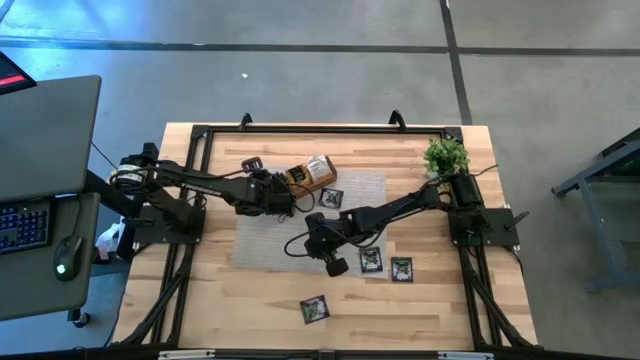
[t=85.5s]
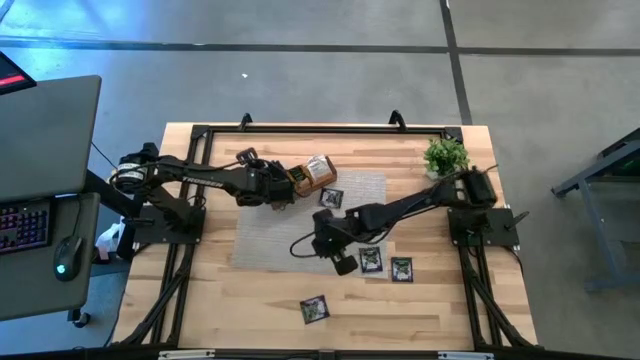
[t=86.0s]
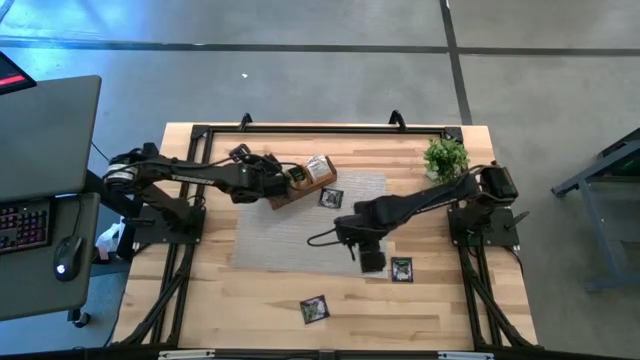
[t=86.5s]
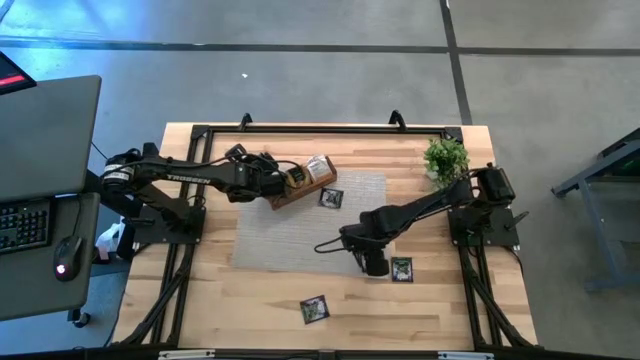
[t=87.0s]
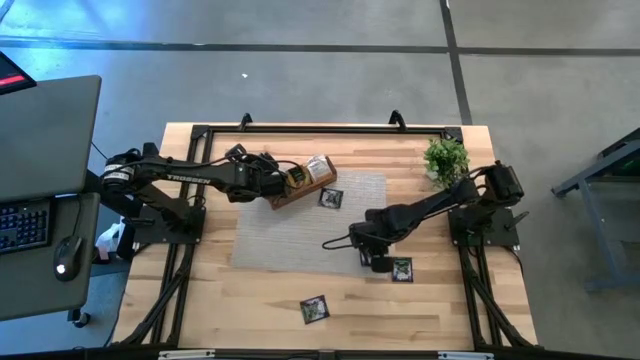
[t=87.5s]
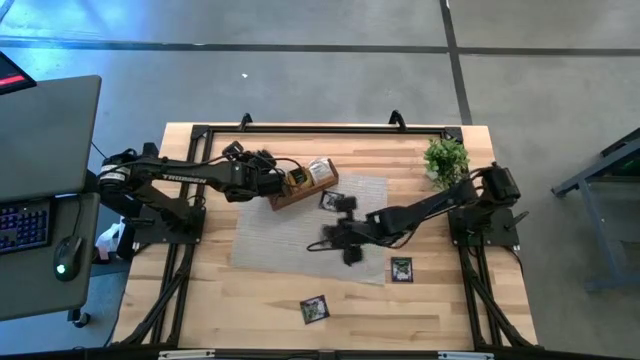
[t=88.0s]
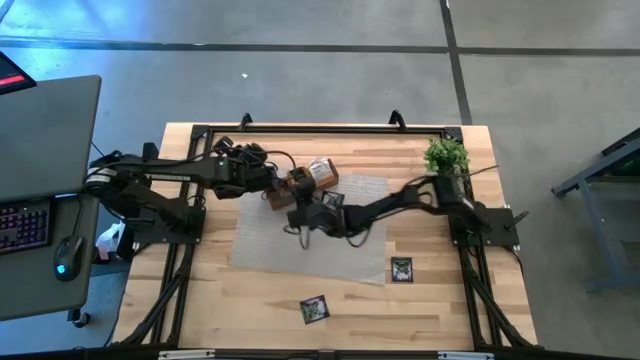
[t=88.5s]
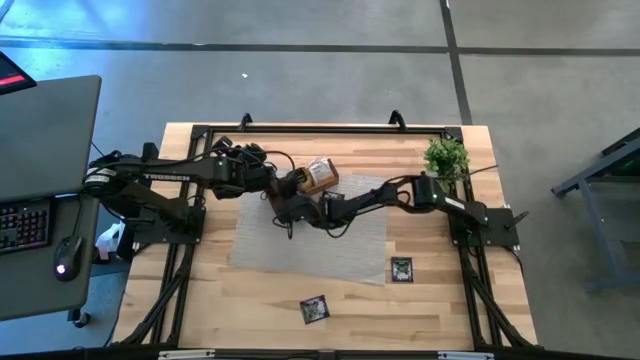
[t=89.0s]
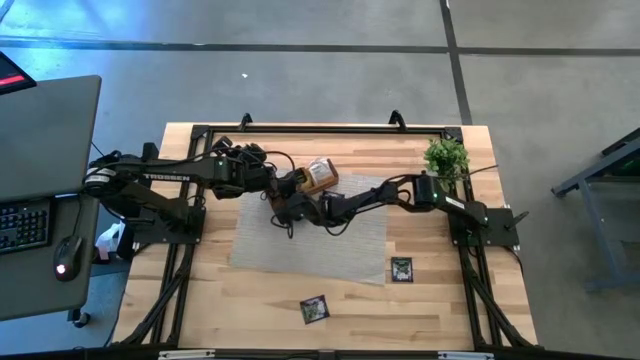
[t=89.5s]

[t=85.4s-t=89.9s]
Task: Pick & Place Tea
Put the purple tea bag into the left section of the wooden organizer

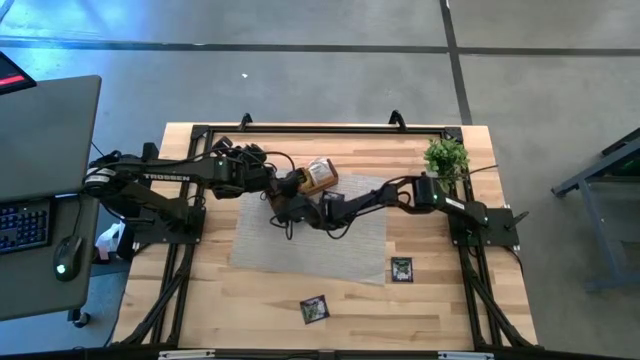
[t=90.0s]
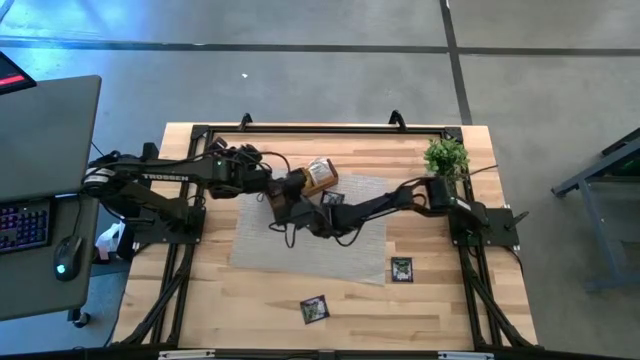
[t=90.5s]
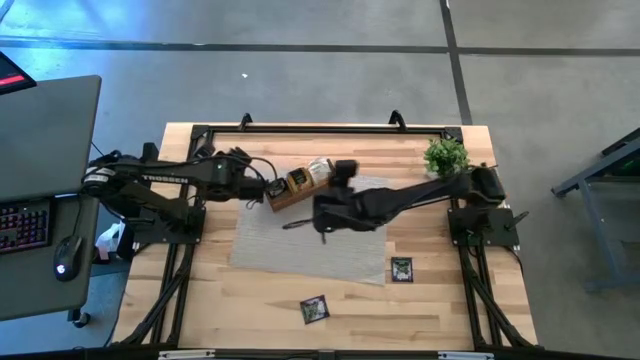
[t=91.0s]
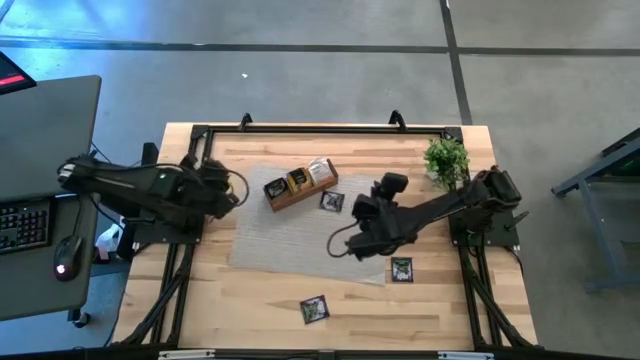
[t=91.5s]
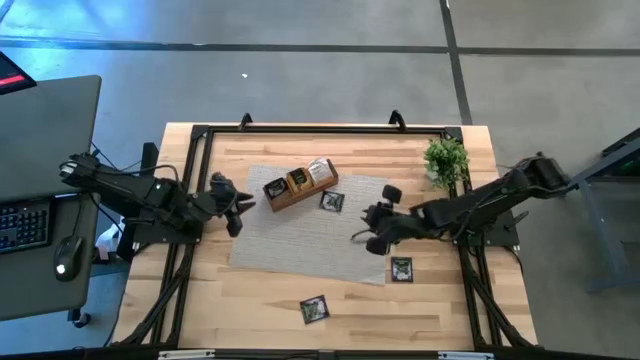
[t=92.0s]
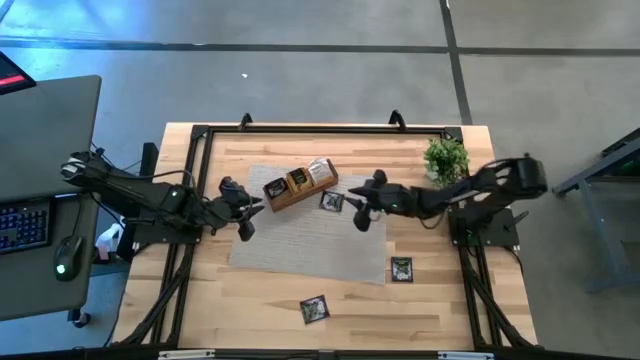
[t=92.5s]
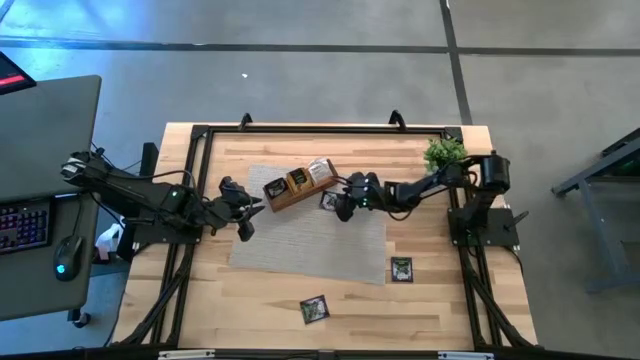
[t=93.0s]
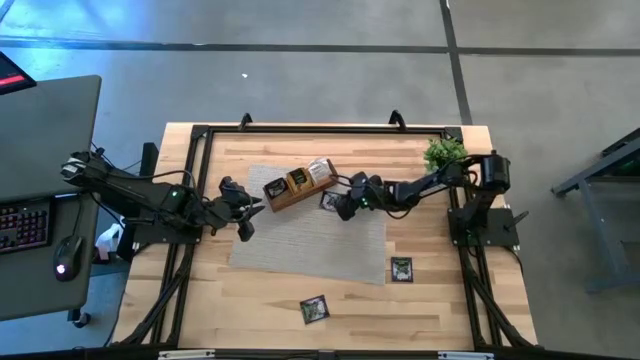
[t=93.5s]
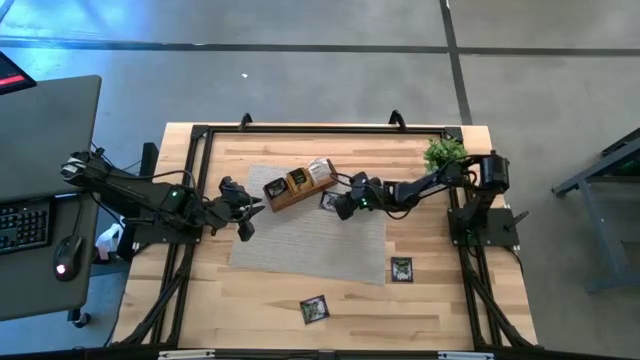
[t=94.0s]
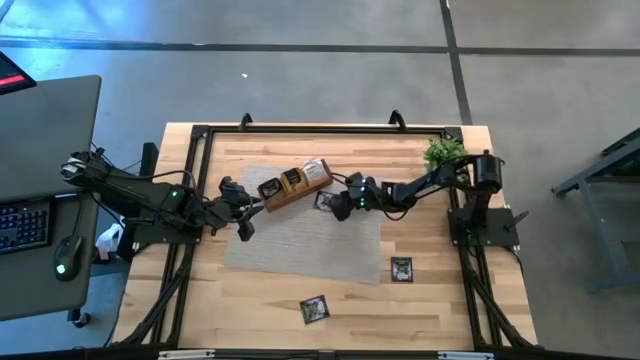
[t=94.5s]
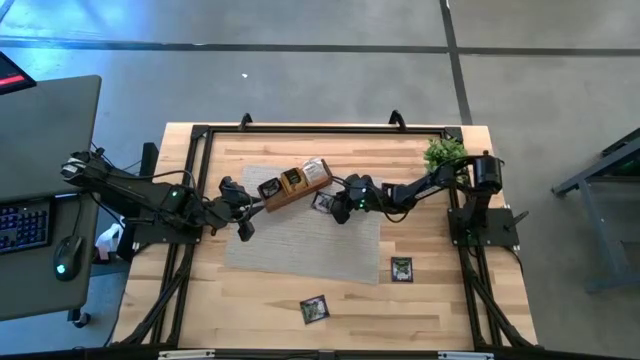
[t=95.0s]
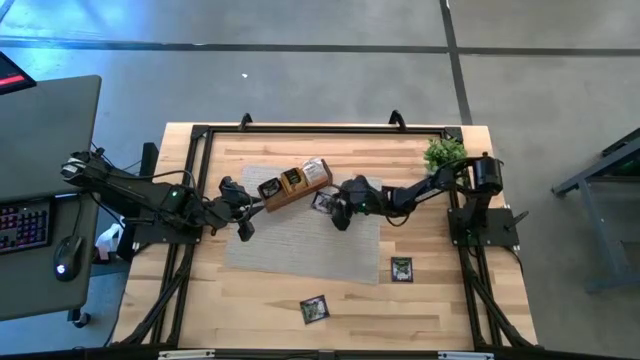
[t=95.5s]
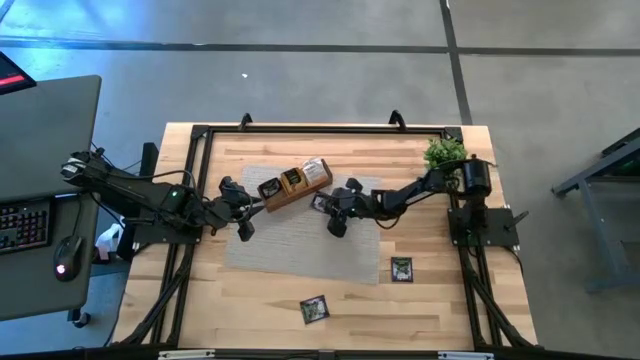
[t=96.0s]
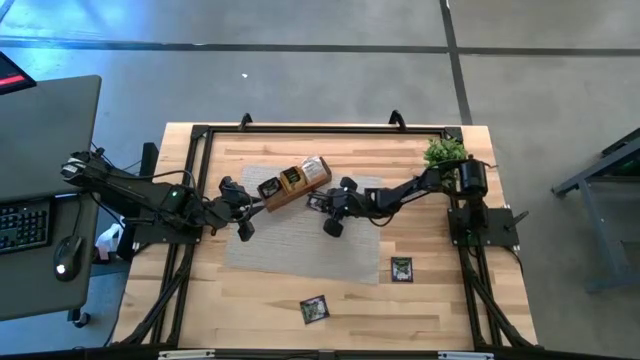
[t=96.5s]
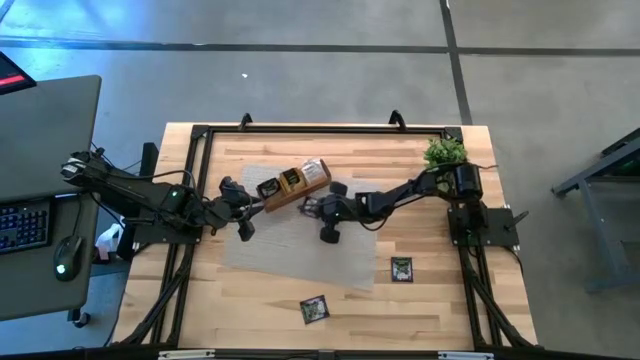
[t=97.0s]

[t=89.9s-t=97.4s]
Put the purple tea bag into the left section of the wooden organizer

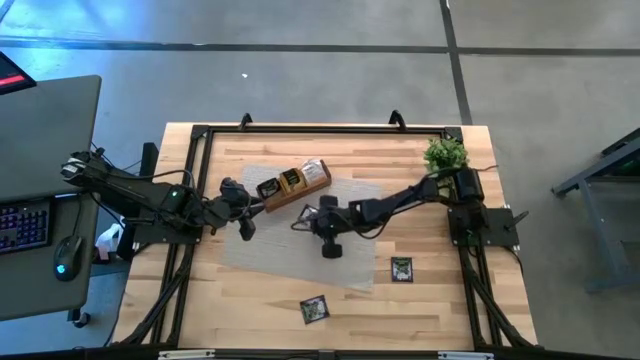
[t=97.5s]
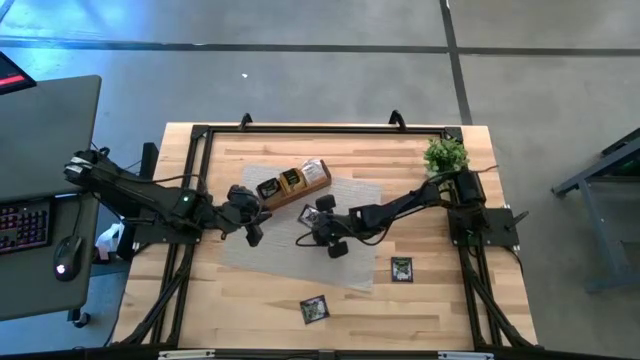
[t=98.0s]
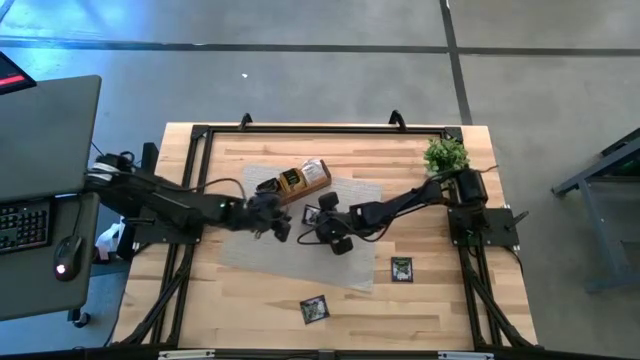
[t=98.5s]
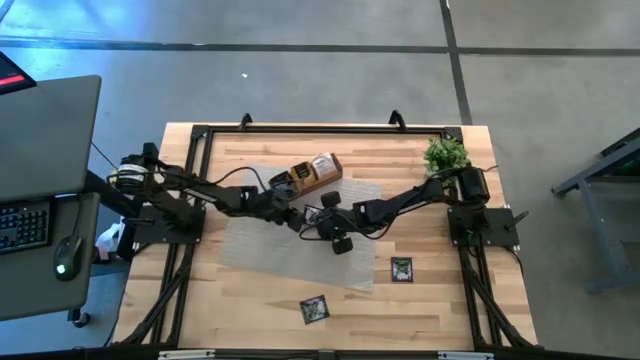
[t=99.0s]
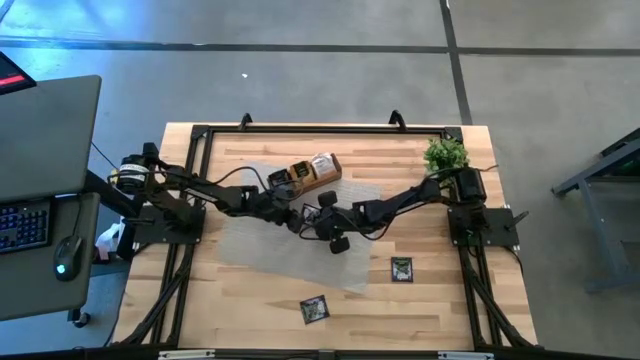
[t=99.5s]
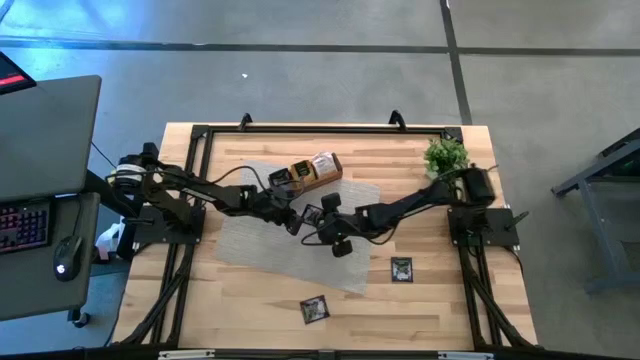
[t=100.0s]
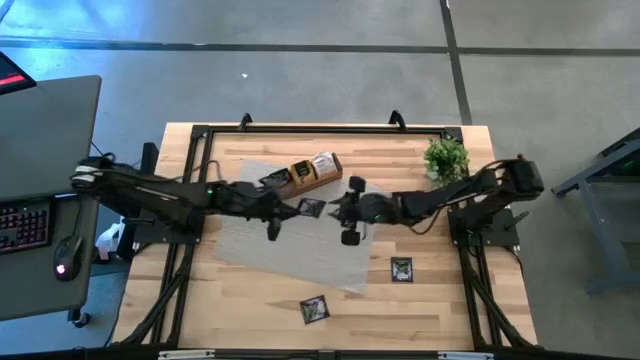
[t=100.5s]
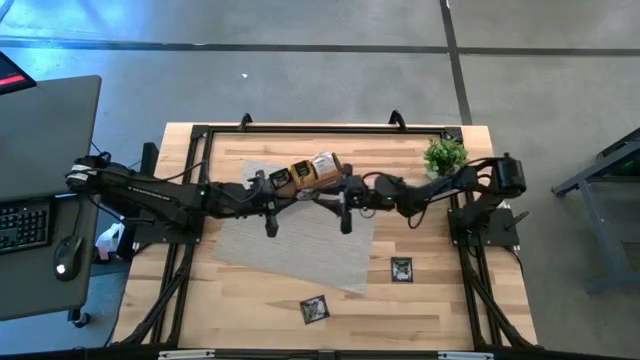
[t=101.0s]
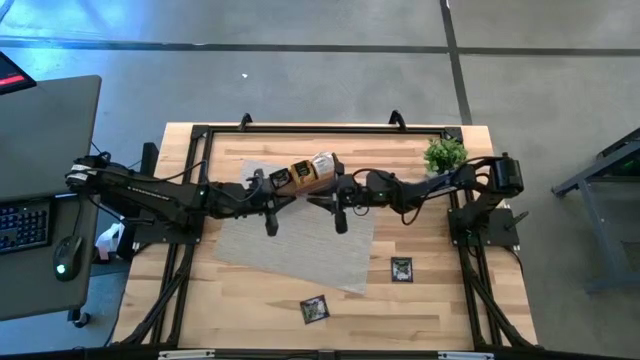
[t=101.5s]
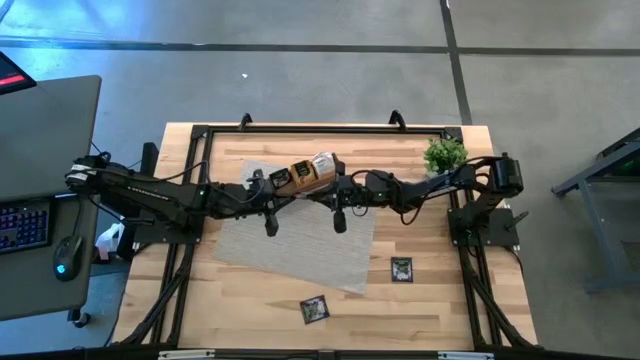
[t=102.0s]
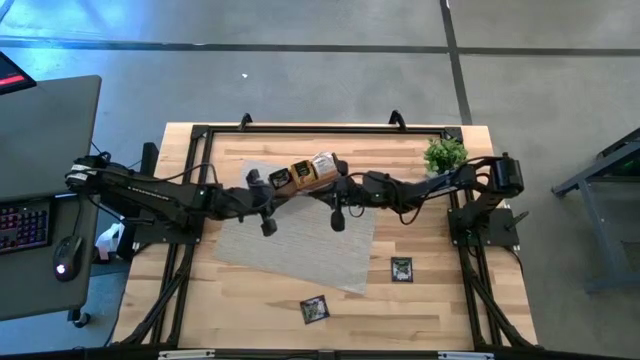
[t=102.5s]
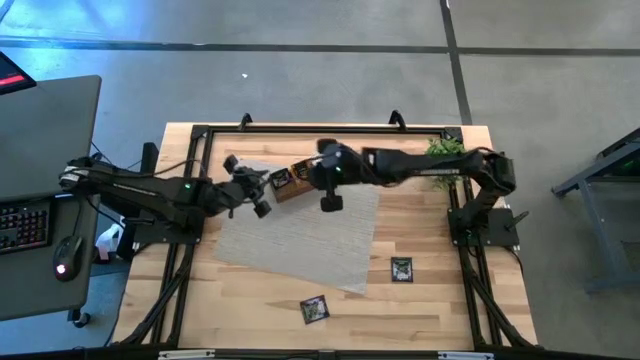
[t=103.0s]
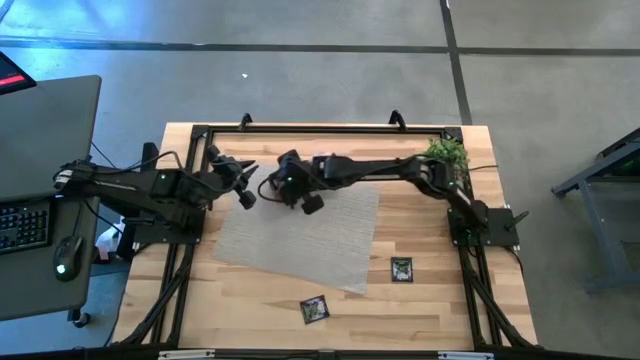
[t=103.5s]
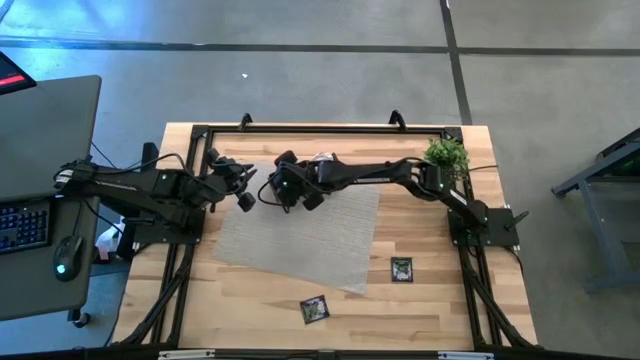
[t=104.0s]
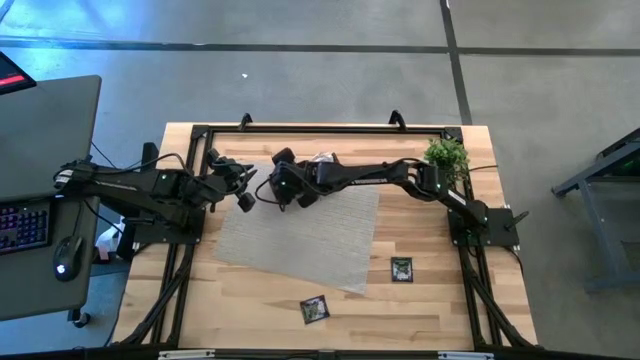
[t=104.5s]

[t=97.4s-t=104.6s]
Put the purple tea bag into the left section of the wooden organizer

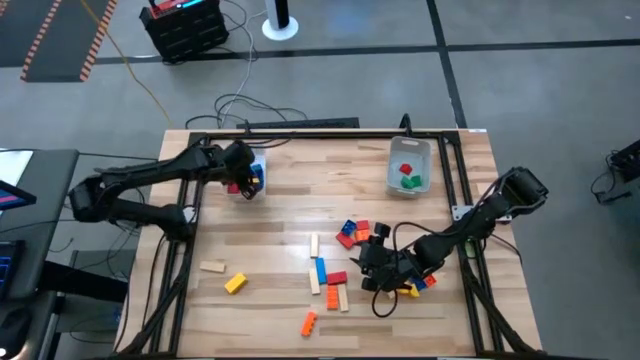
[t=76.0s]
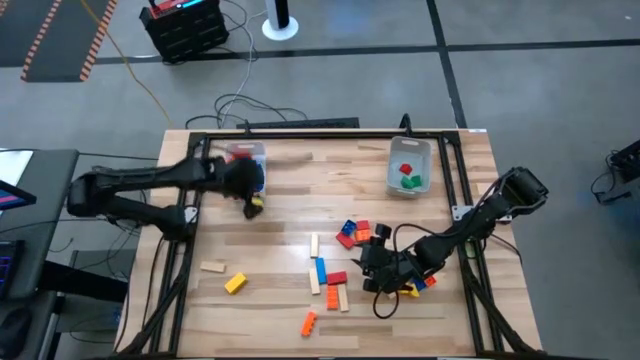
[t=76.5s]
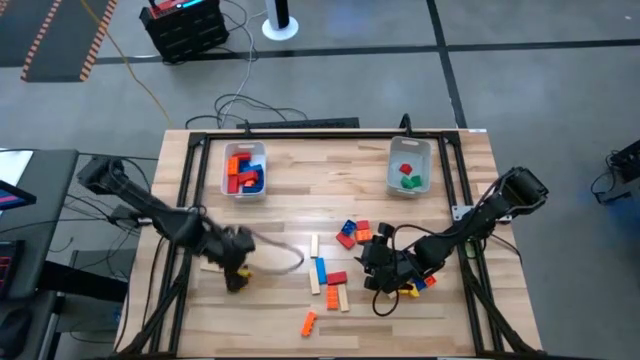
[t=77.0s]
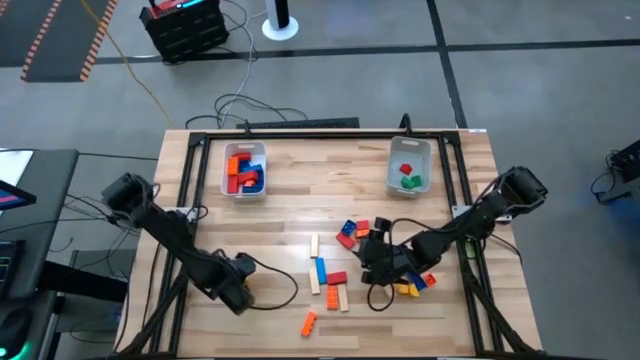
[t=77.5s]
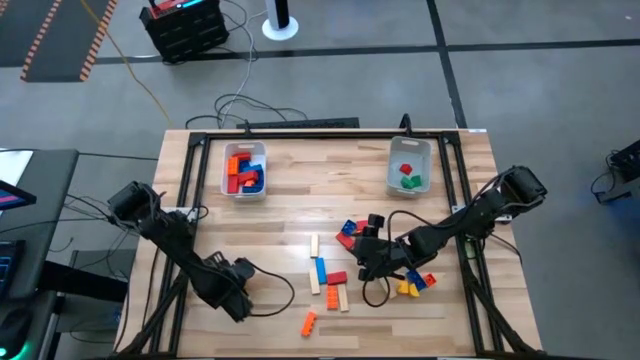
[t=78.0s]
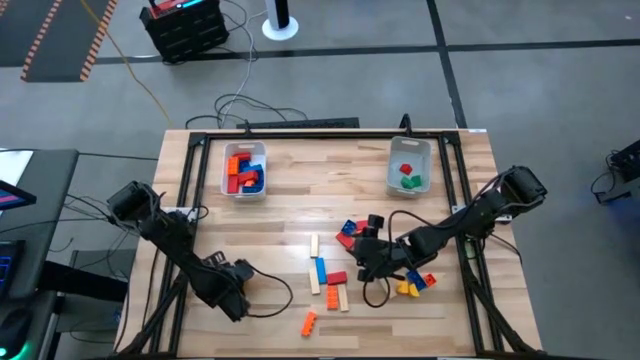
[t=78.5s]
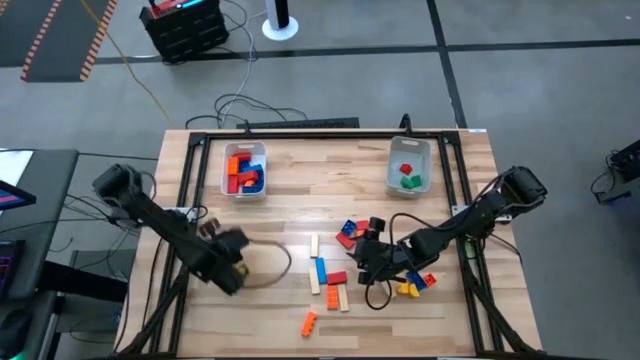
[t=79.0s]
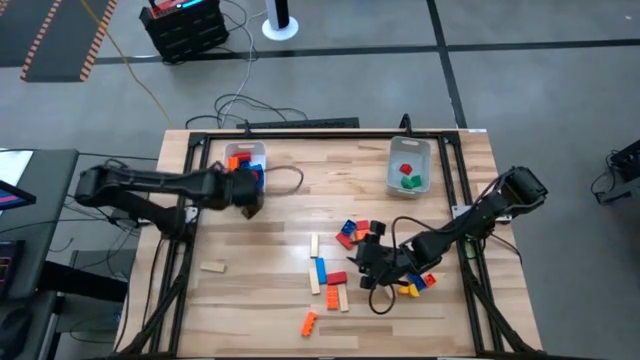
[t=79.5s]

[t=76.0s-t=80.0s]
Task: Sort blocks by size
Put the large yellow block into the white bin
